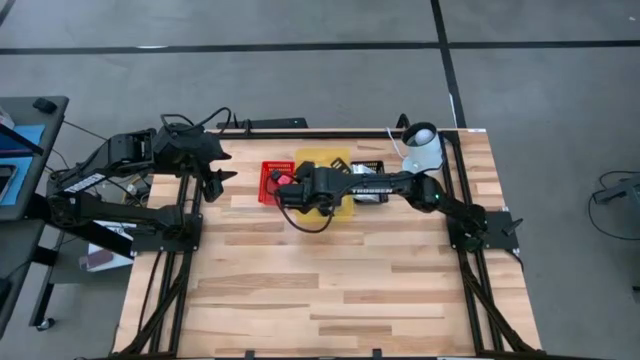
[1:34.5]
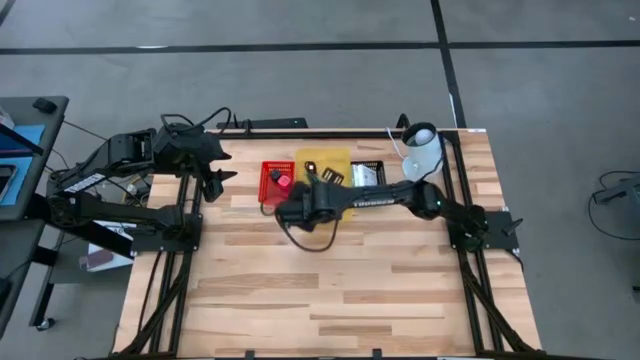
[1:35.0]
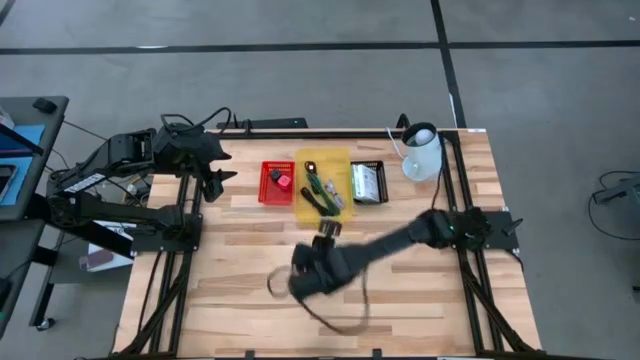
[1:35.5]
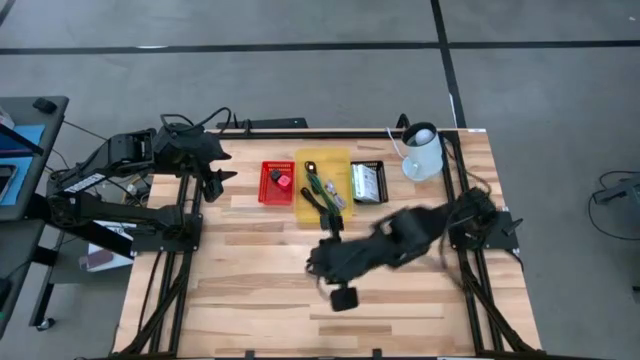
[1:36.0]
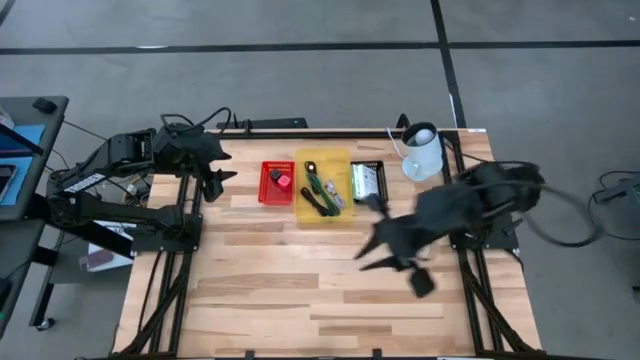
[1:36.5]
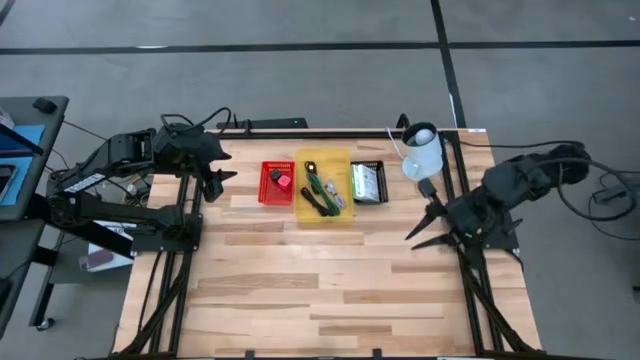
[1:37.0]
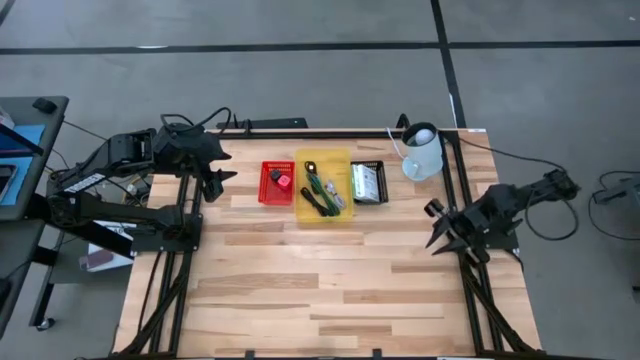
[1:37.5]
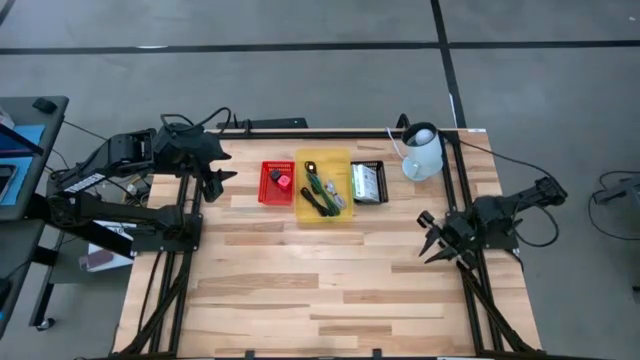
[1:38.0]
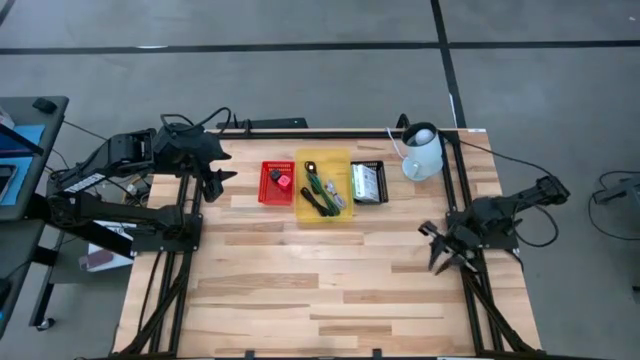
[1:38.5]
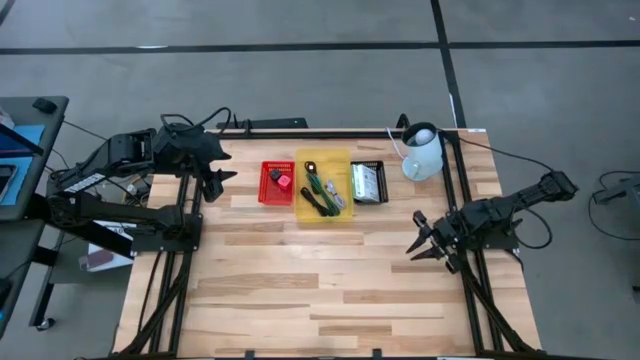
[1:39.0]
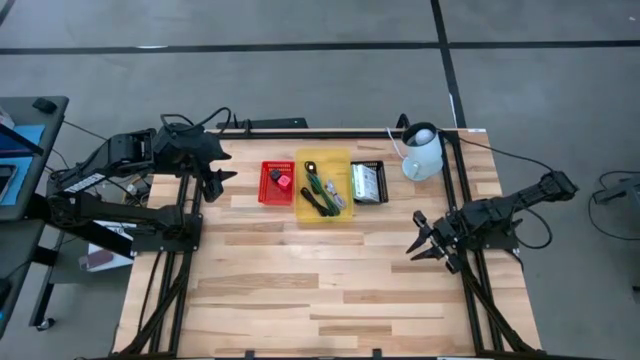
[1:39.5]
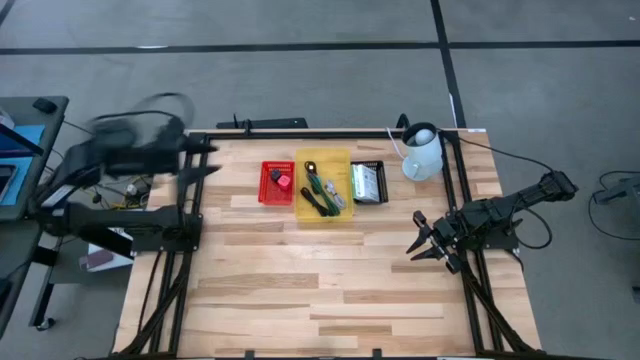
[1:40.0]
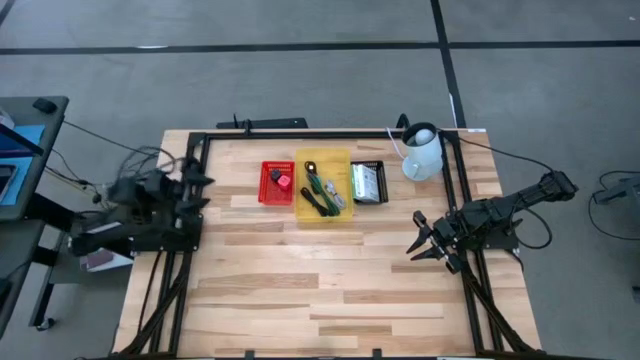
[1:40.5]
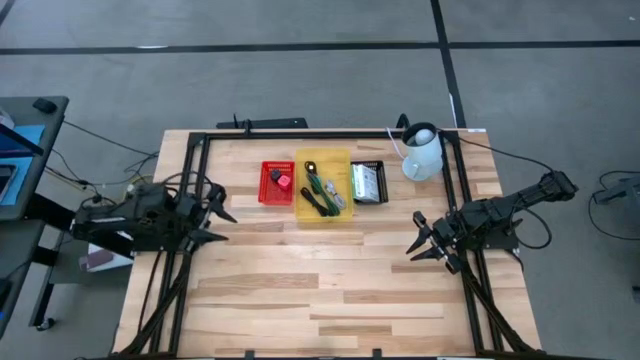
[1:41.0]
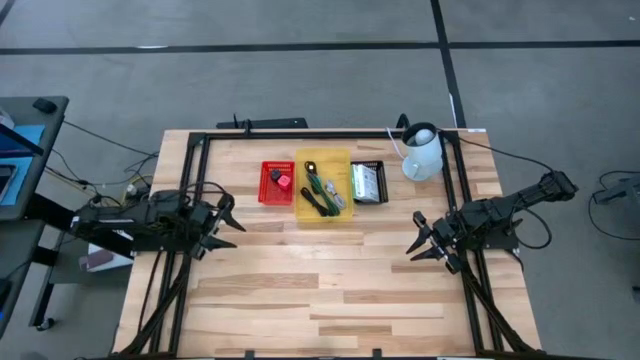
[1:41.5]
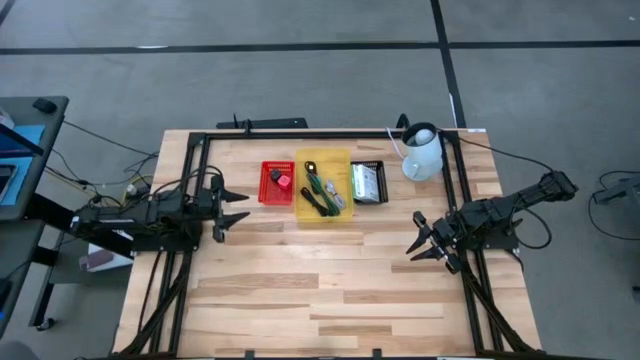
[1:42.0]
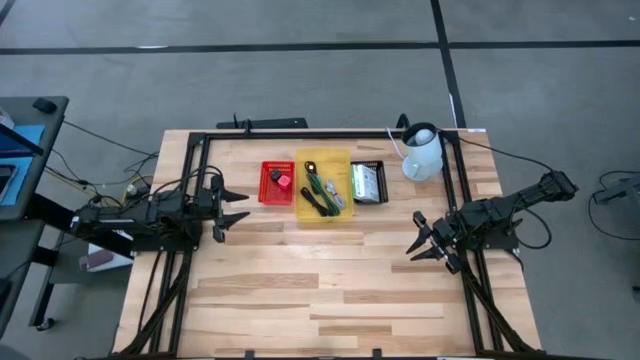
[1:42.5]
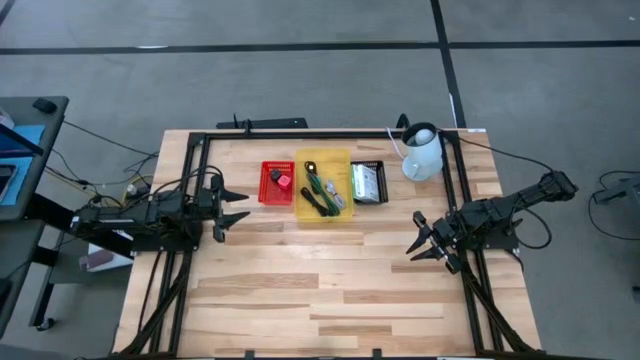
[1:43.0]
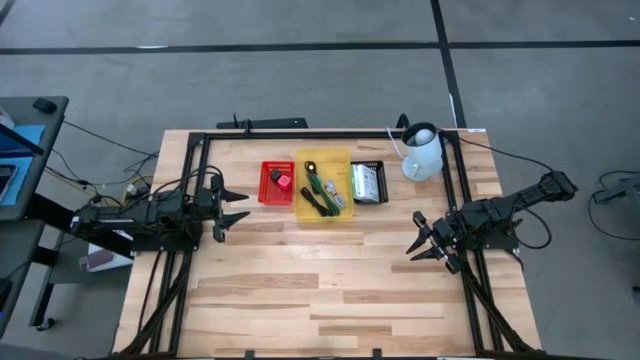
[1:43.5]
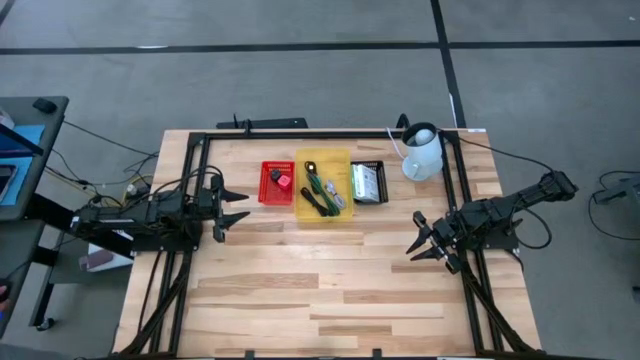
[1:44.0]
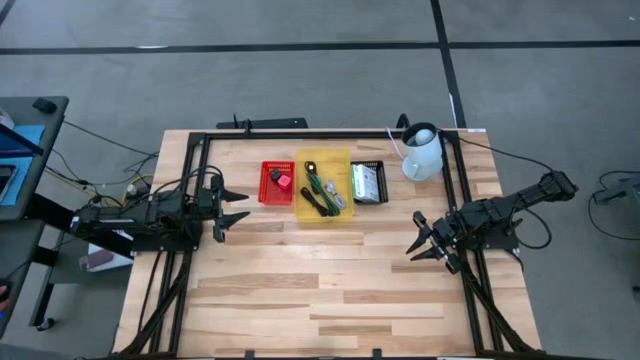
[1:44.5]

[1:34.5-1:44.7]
Task: Pick and place items into bin
Return to Home Position

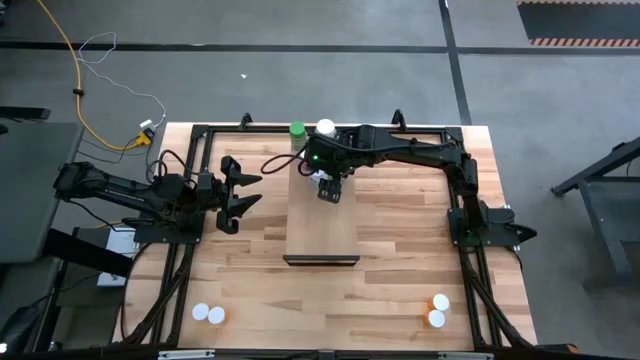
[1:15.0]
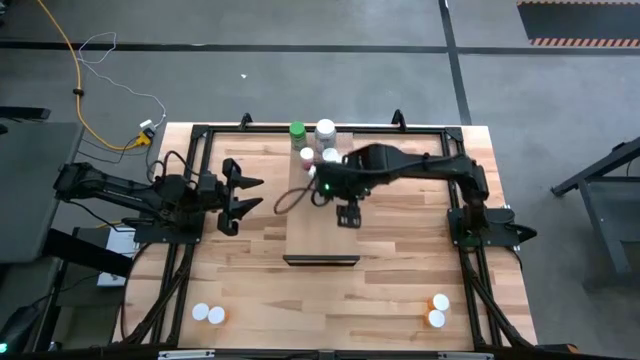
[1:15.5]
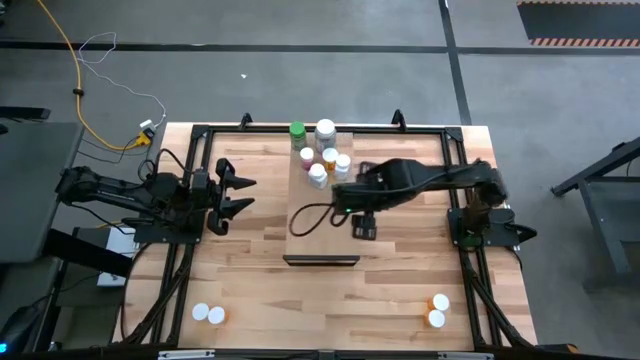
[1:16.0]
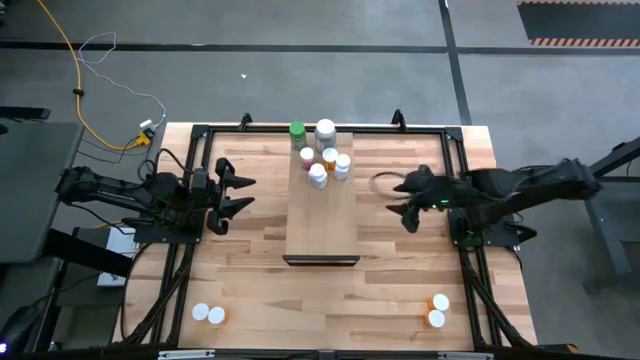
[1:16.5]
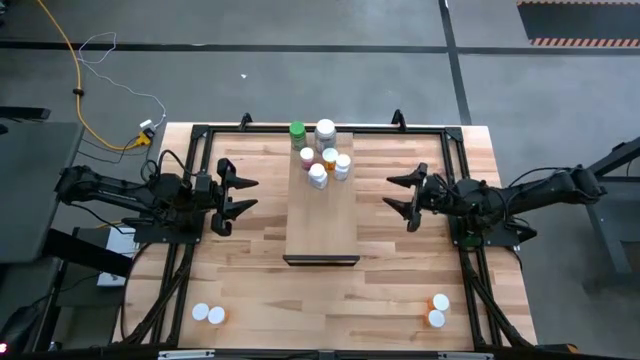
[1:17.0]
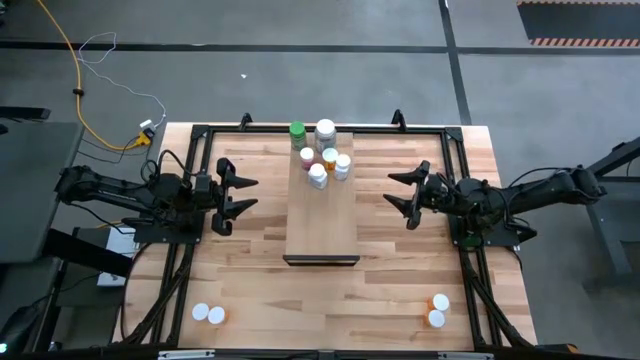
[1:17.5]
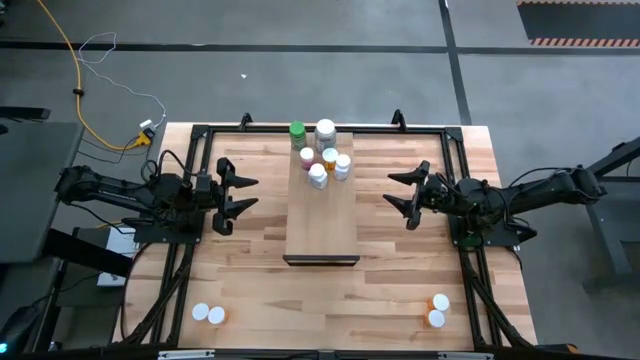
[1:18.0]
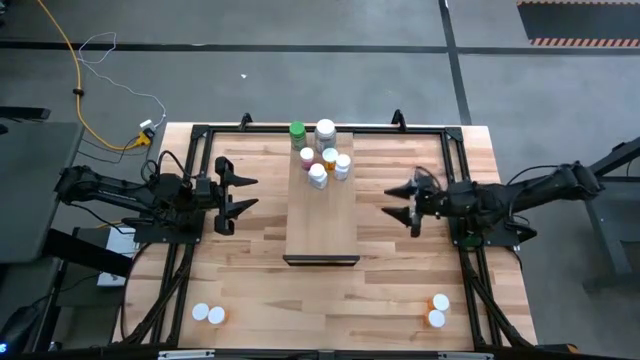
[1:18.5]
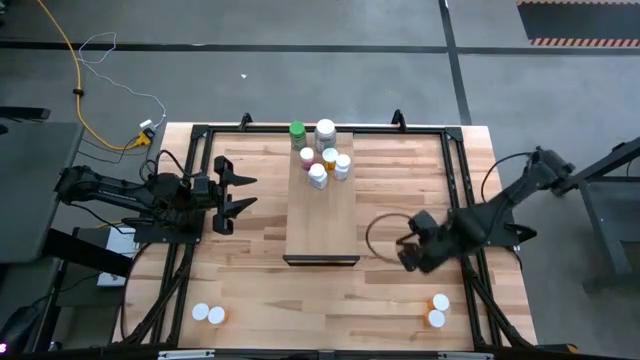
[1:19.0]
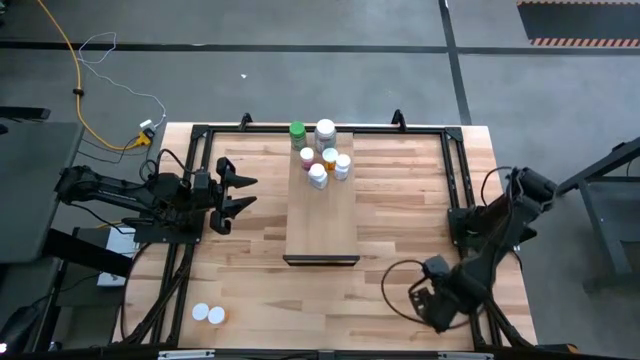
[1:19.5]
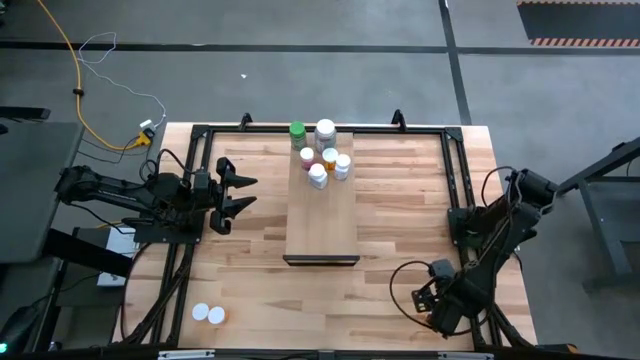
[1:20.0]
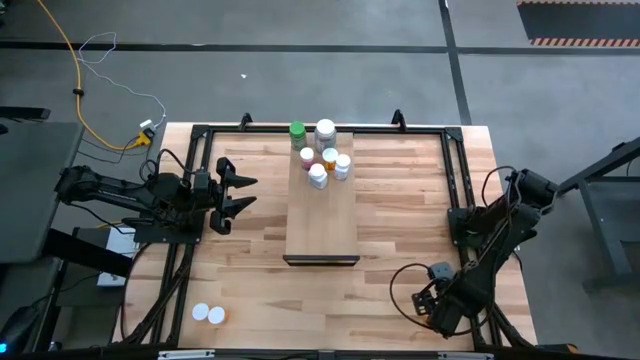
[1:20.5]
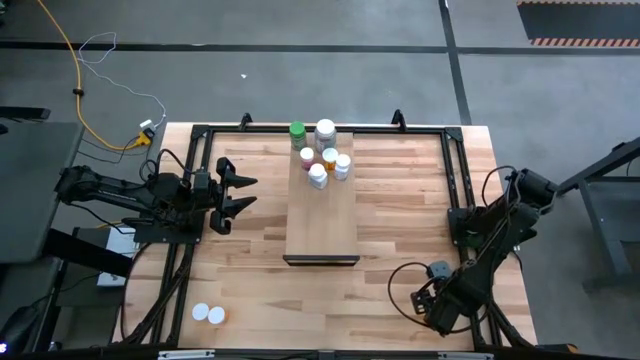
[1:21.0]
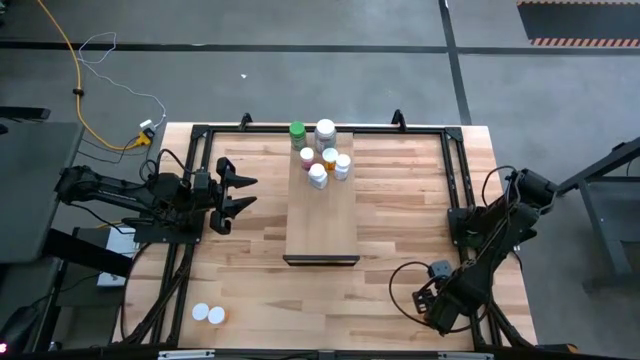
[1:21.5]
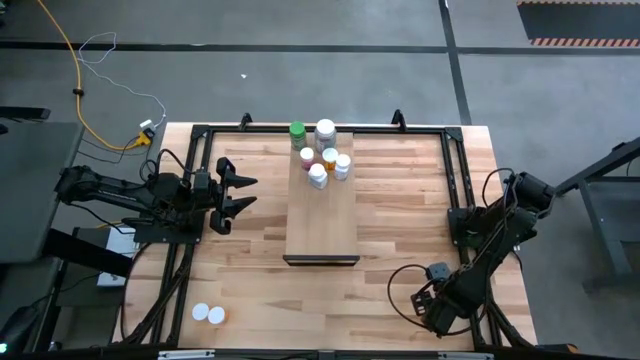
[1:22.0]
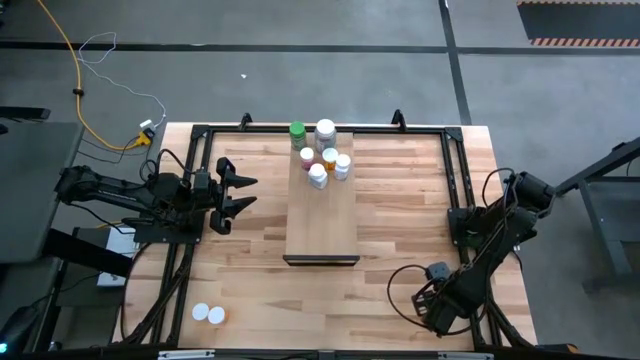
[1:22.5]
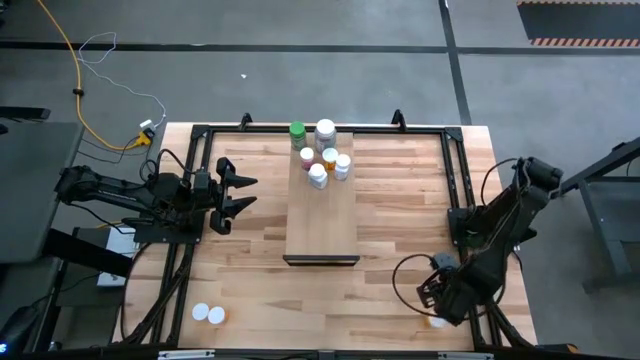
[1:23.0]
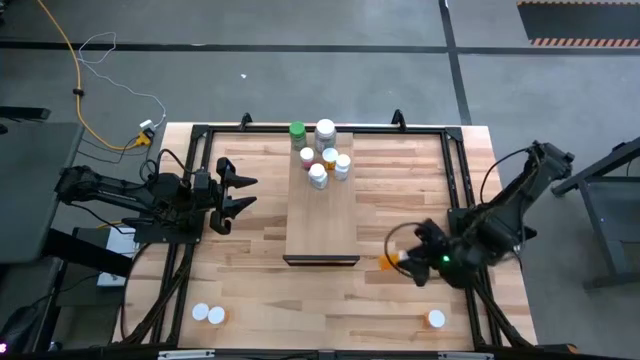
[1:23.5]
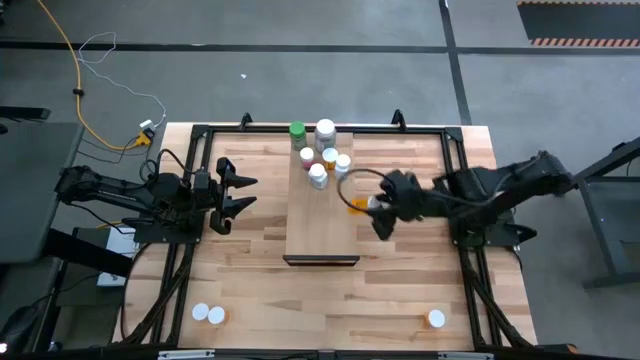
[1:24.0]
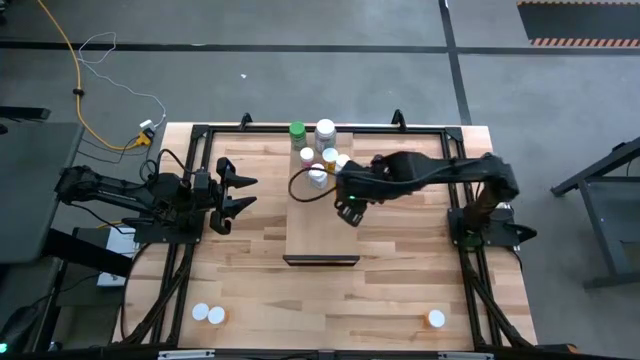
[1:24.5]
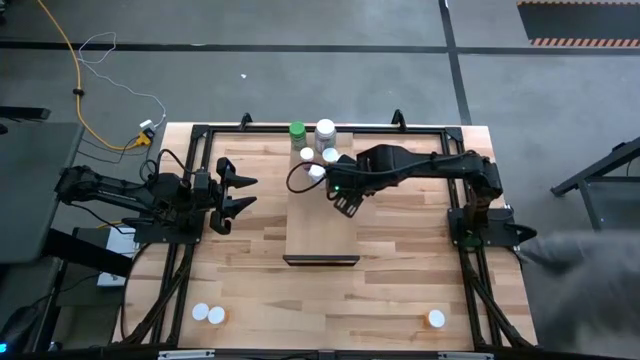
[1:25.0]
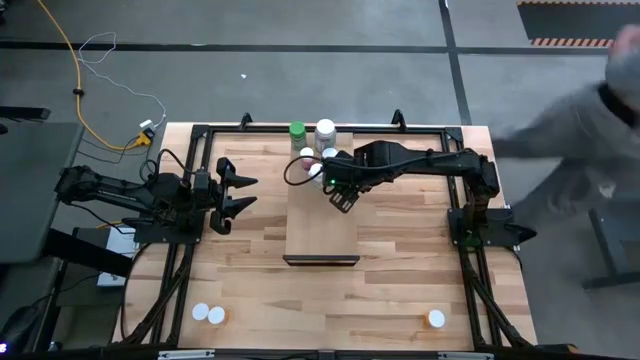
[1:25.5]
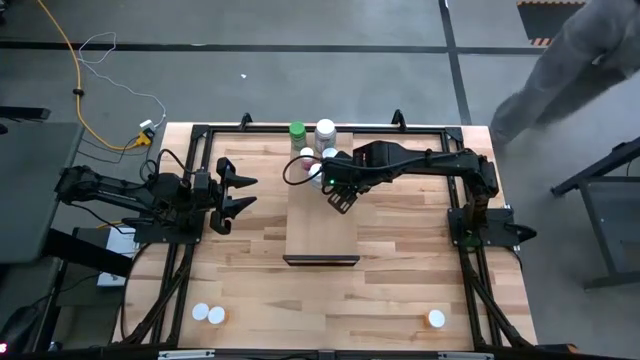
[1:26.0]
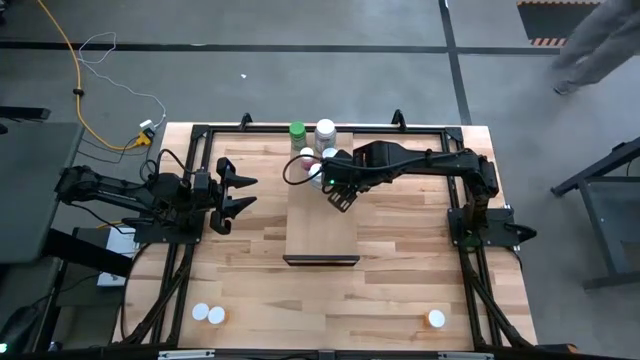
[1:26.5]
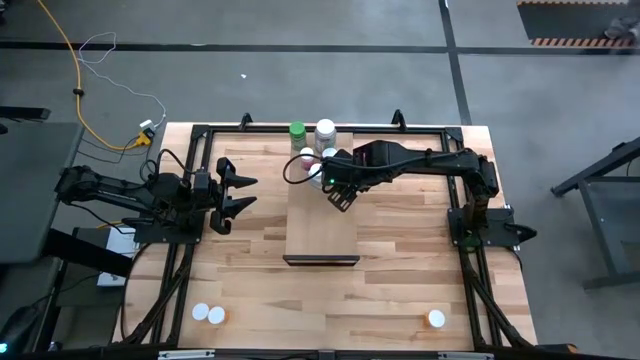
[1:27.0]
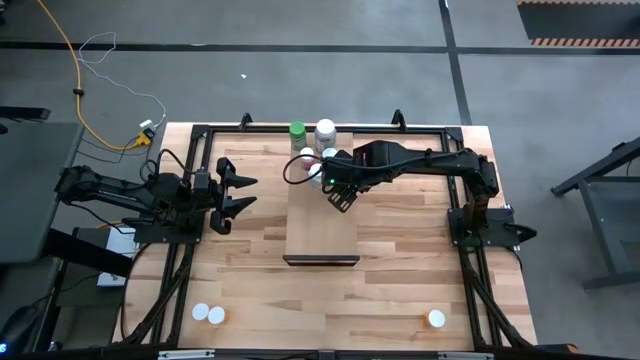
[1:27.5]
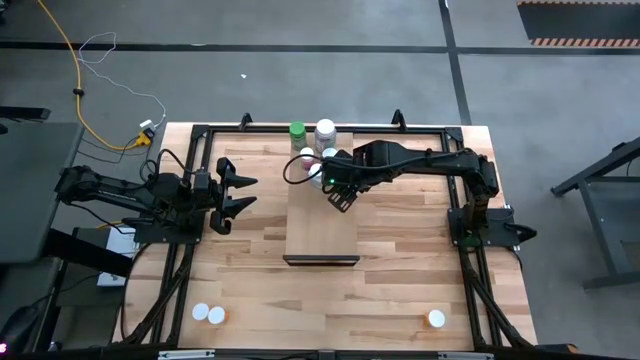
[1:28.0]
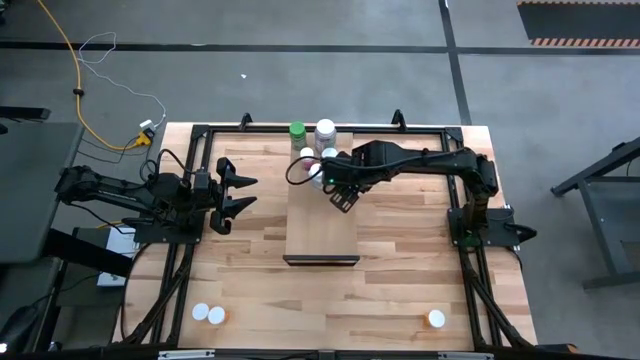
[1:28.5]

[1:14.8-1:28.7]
Task: Pick and place medicine bottles onto shelf by color
Put the orange pill bottle on the shelf
